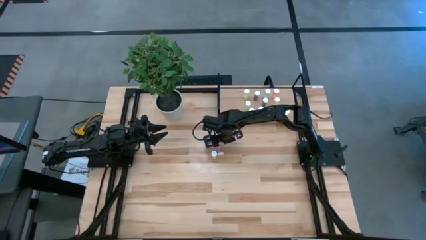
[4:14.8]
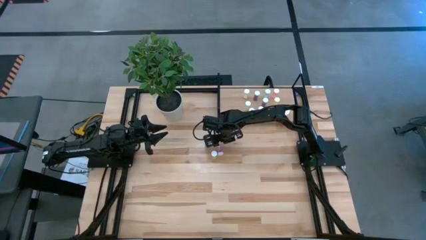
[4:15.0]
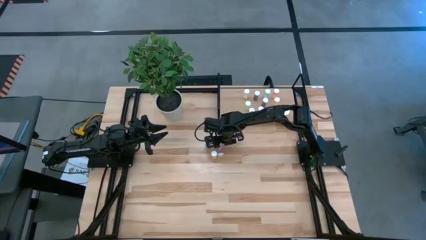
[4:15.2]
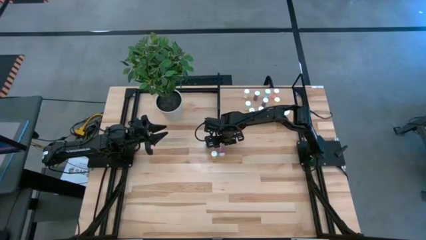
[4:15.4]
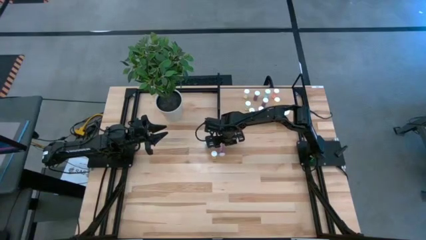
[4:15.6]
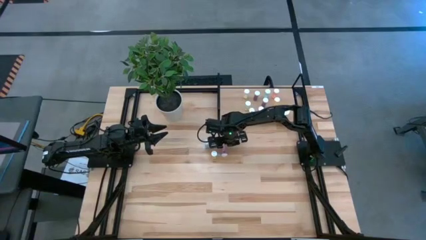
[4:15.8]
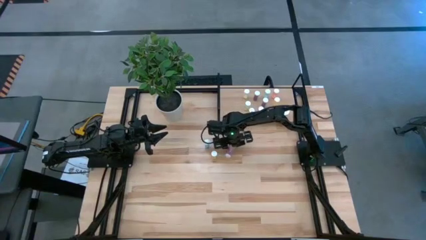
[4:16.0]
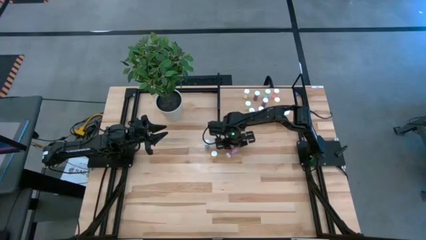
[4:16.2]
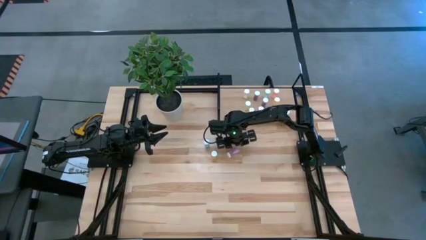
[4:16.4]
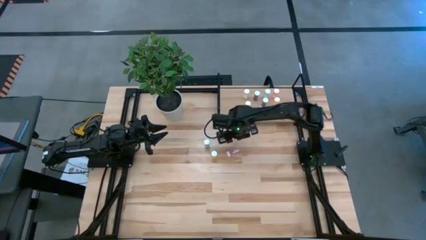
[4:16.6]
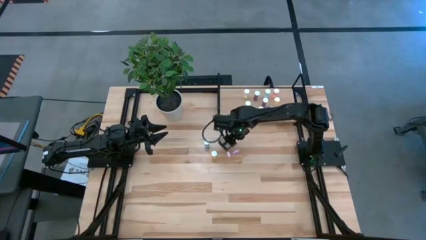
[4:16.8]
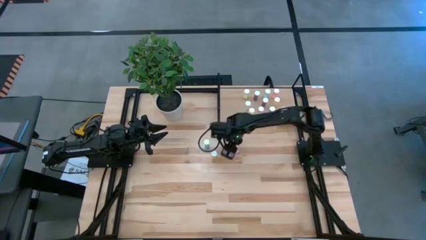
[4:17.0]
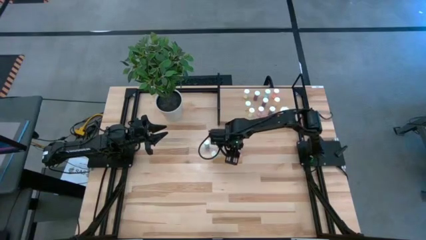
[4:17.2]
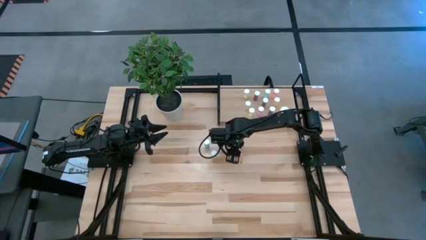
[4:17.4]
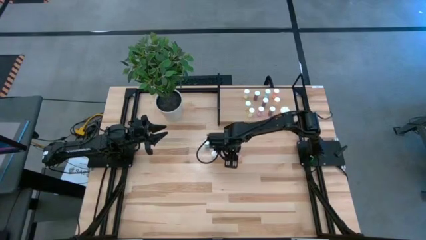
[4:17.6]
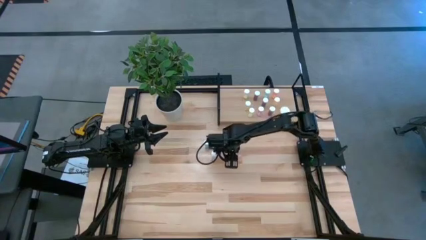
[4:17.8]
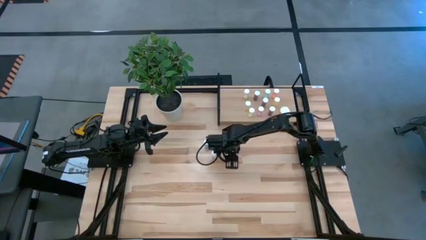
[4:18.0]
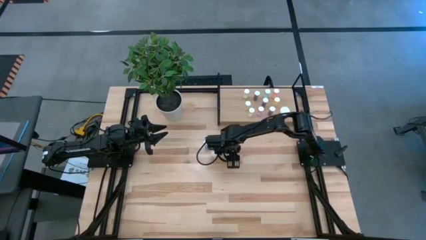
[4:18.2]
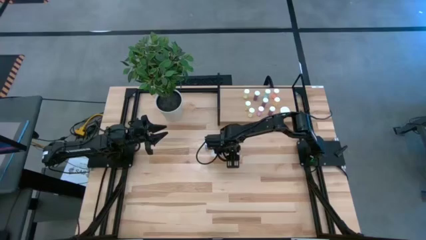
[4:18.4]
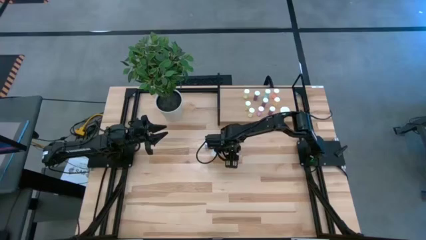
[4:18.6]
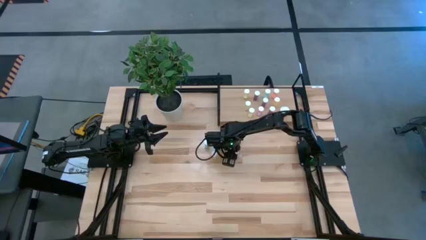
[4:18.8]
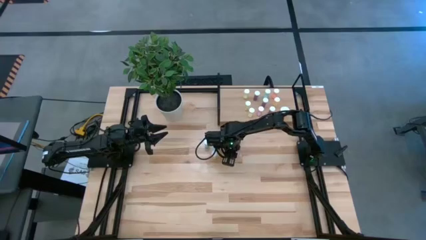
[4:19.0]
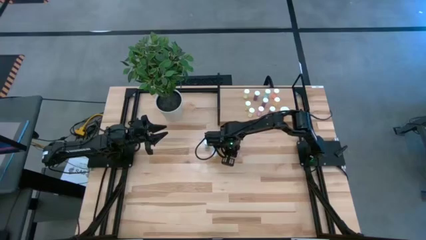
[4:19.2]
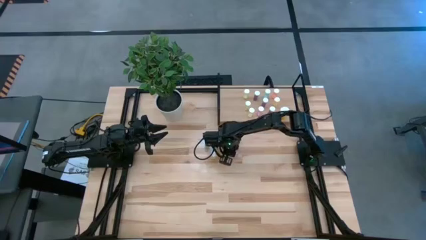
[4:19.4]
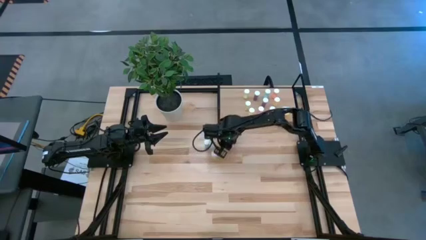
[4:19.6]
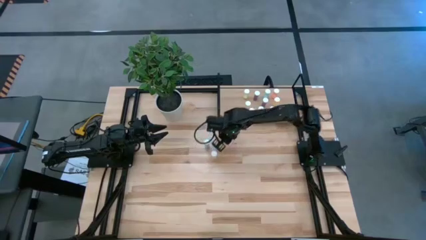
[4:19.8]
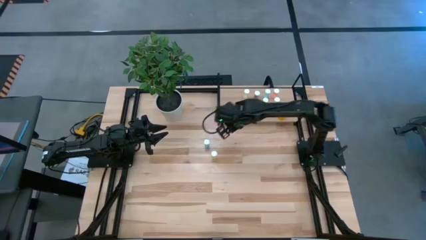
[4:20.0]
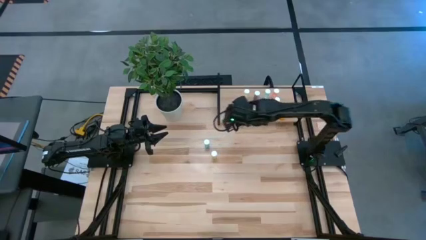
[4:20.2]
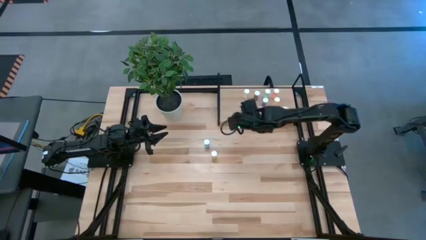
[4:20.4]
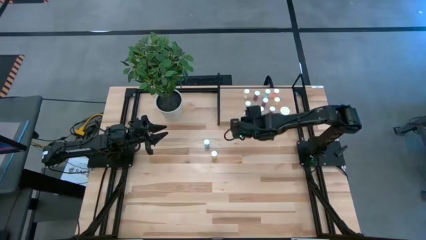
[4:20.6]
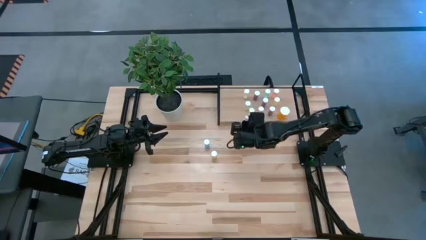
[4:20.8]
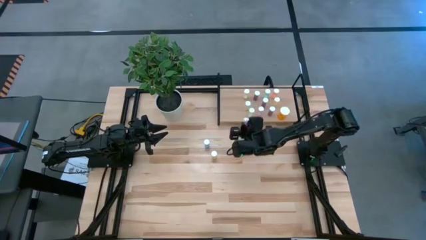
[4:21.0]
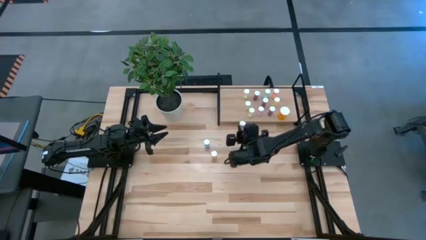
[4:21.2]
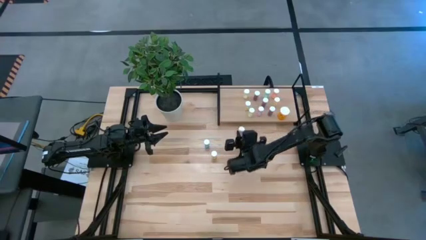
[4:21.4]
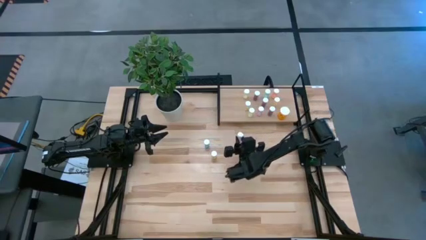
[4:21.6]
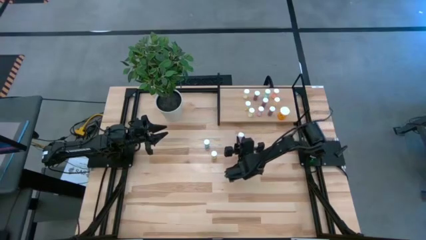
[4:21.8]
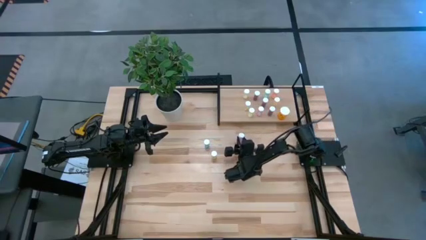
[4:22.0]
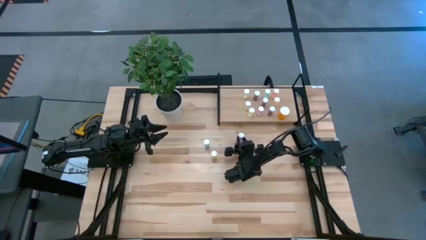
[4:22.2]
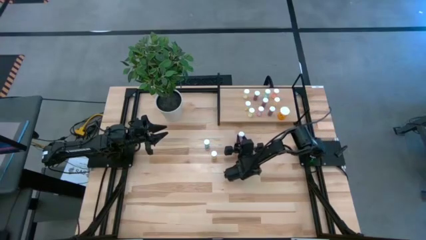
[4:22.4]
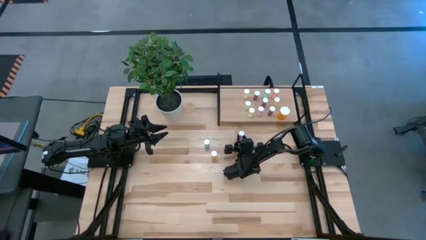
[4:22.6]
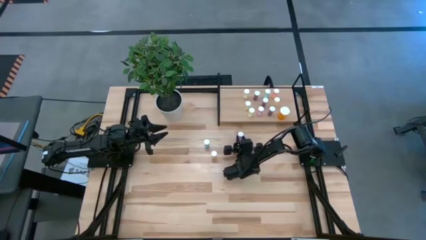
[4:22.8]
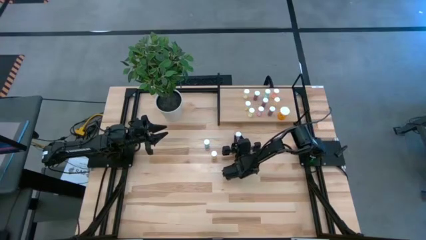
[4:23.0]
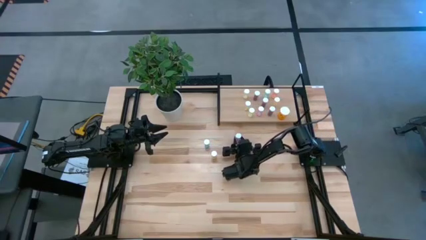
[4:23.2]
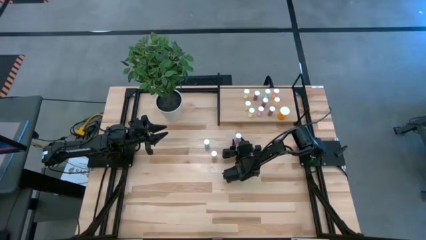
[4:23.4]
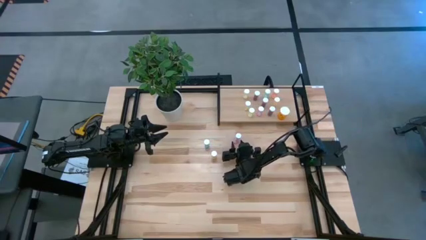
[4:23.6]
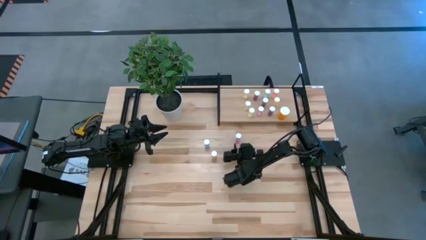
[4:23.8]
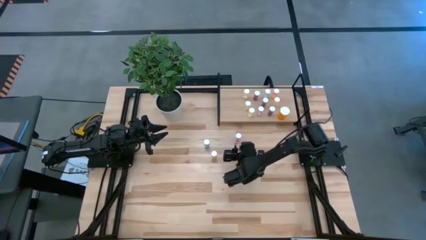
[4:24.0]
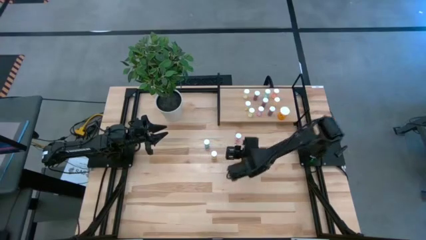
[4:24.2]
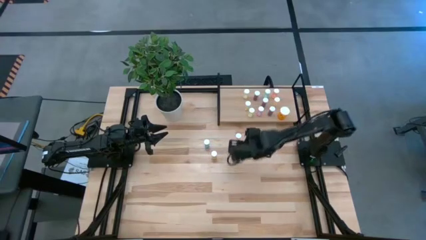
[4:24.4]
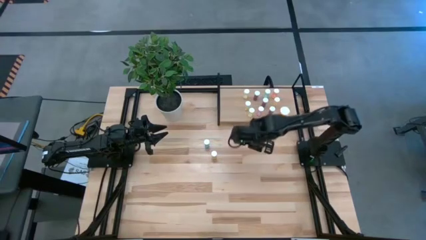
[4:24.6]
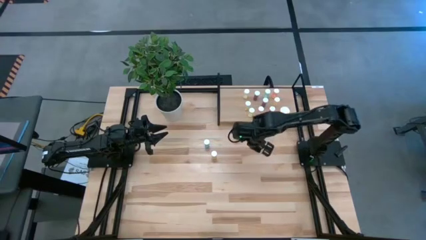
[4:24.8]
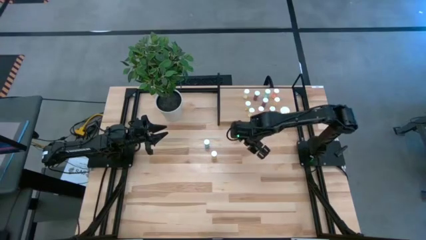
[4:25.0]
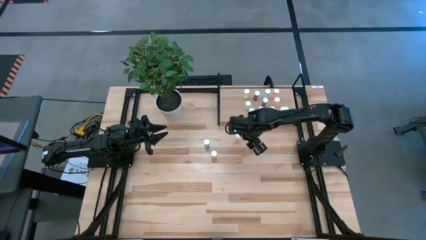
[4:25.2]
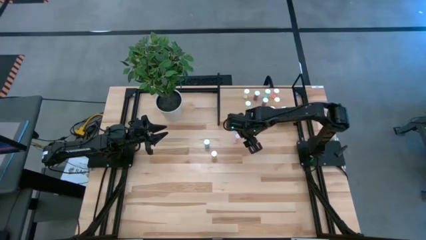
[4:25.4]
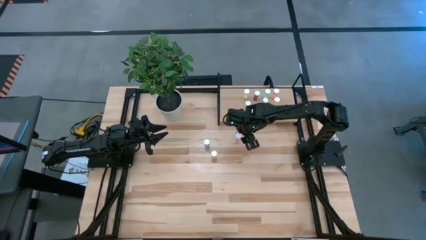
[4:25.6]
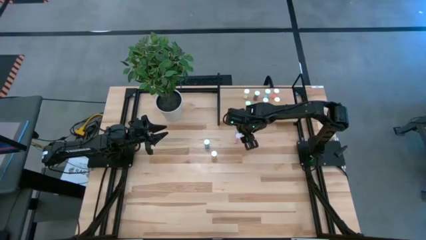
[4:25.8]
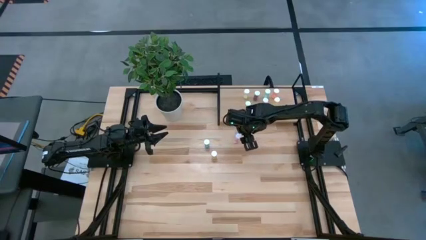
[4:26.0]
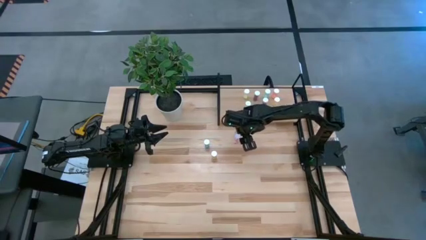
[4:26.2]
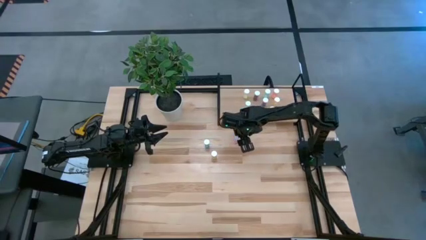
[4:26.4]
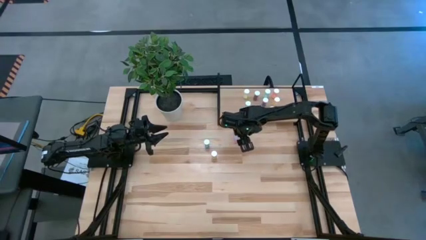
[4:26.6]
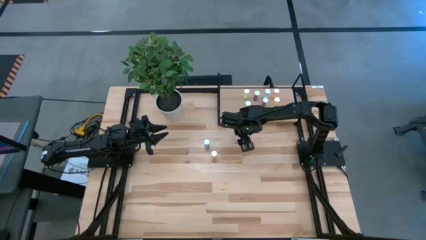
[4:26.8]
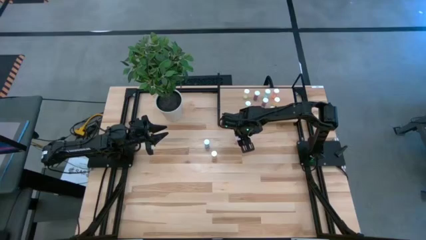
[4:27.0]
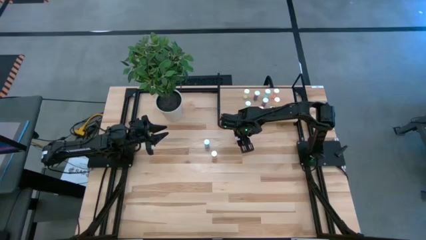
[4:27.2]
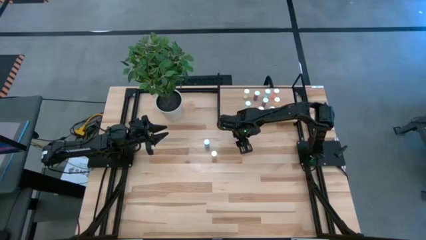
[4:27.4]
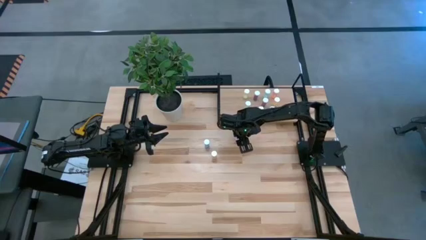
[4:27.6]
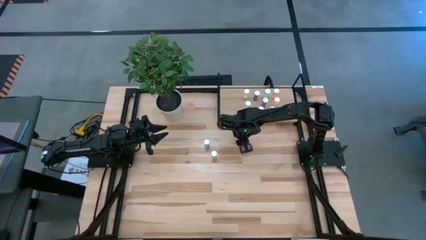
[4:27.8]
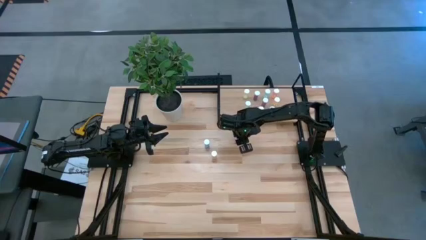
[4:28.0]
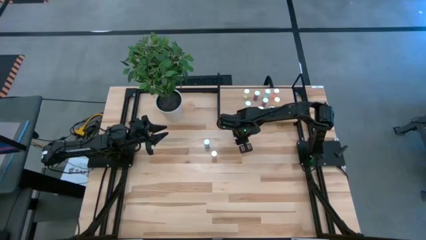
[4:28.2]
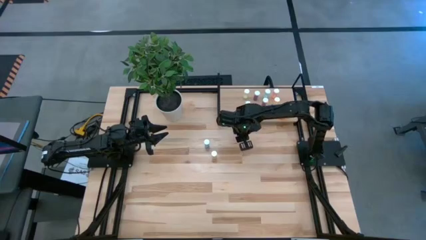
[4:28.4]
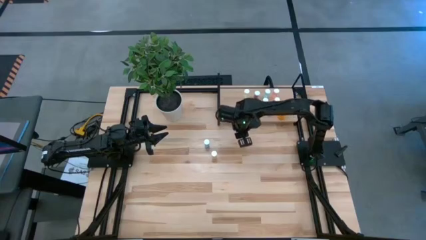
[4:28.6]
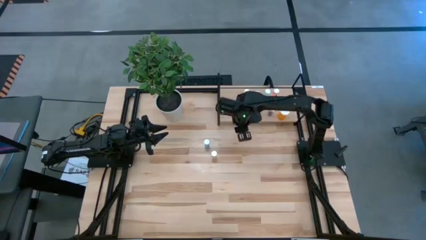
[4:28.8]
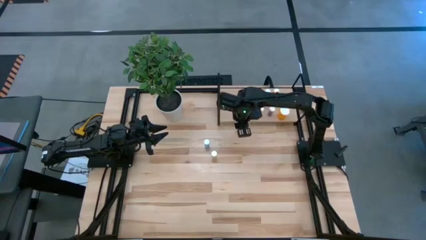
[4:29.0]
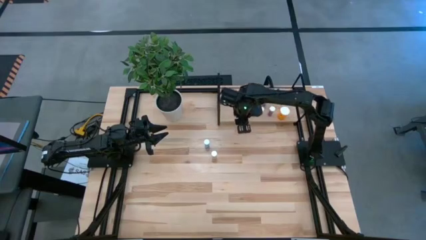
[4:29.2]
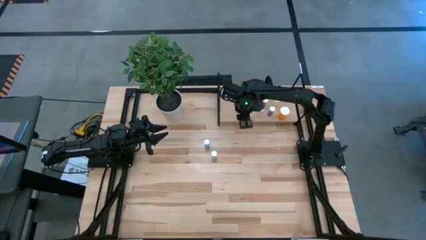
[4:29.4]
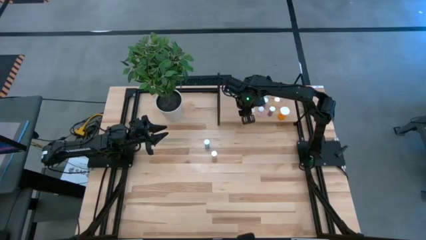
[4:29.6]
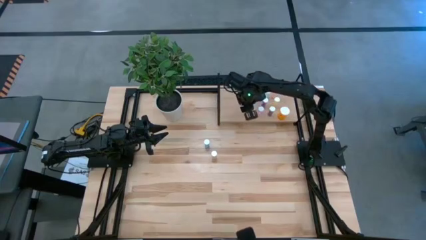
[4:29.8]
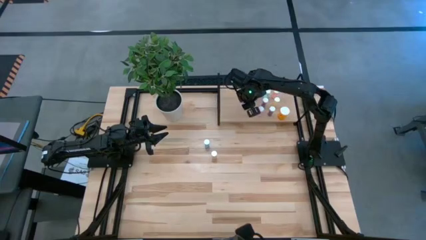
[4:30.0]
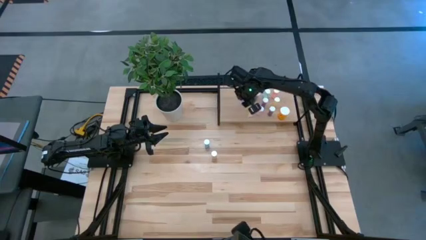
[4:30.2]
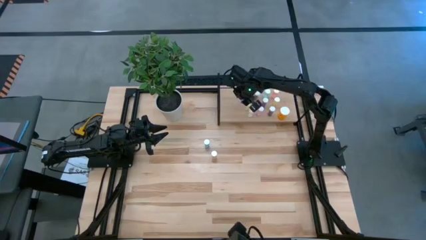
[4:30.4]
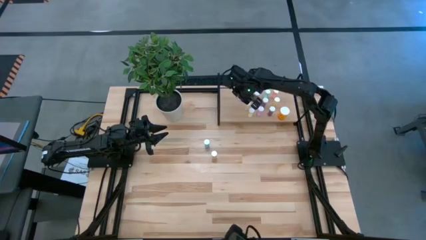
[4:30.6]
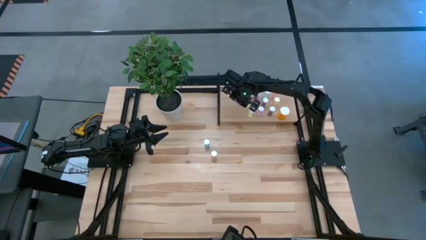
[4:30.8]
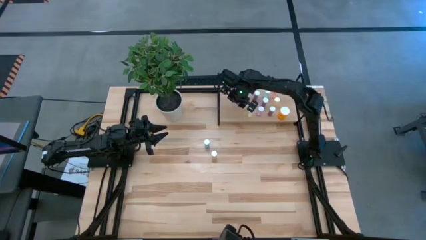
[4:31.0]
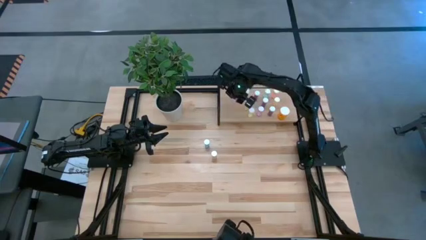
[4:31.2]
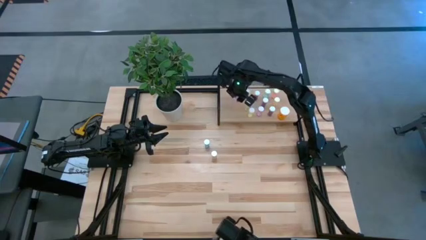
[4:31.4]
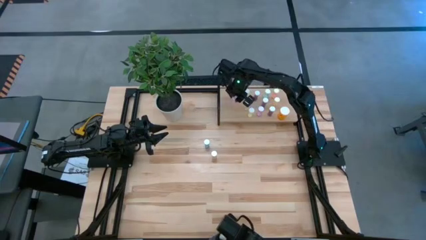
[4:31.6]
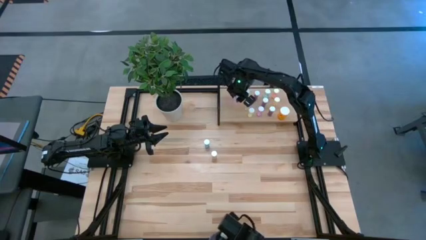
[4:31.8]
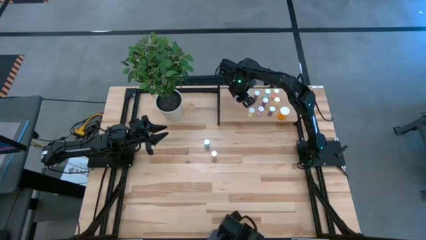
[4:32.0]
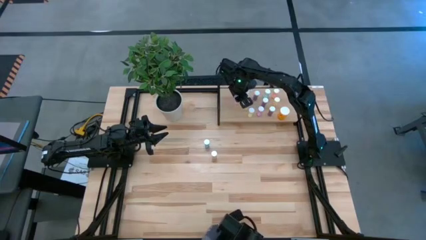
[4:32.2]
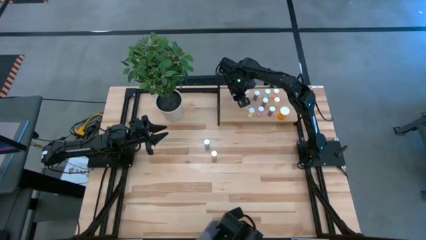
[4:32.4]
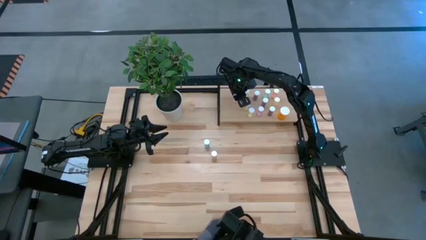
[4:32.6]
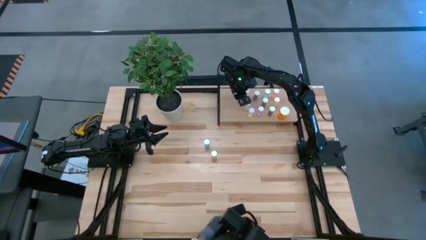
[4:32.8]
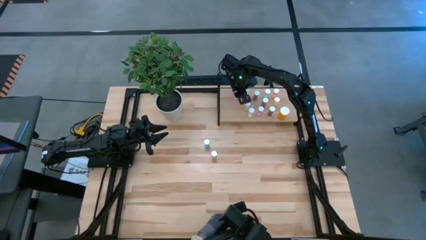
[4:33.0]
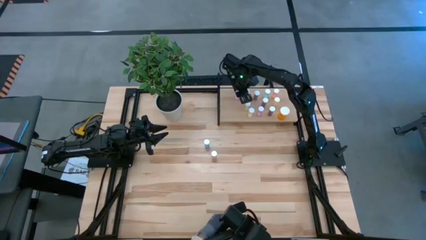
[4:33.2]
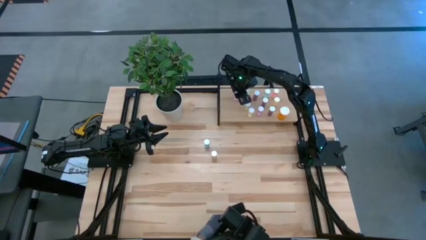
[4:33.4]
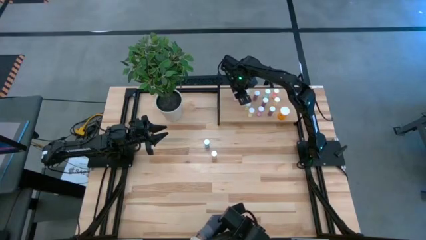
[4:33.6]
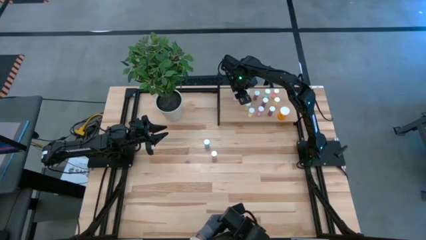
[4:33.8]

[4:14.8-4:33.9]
Task: Pick and place medicine bottles onto shelf by color
Put the pink pill bottle on the shelf
